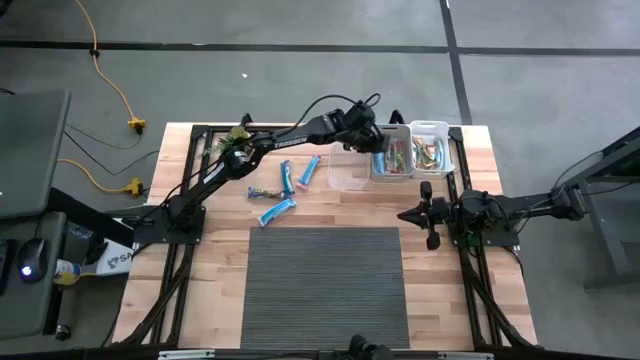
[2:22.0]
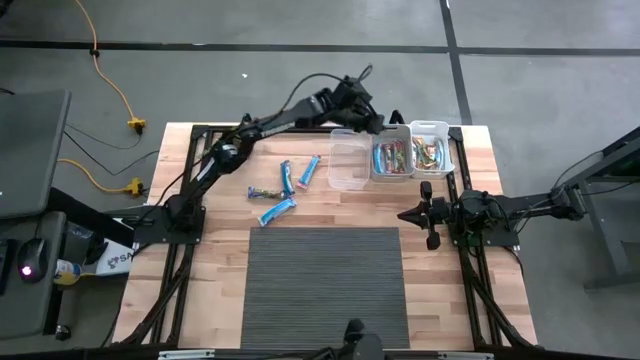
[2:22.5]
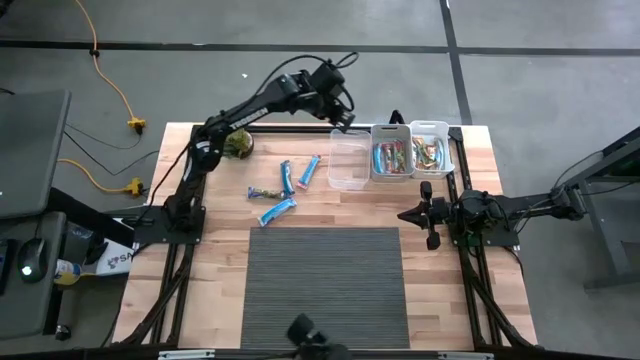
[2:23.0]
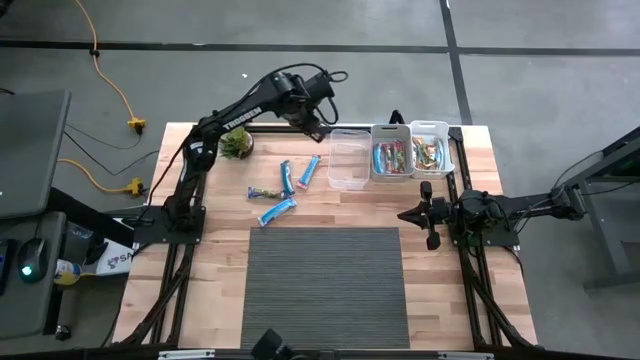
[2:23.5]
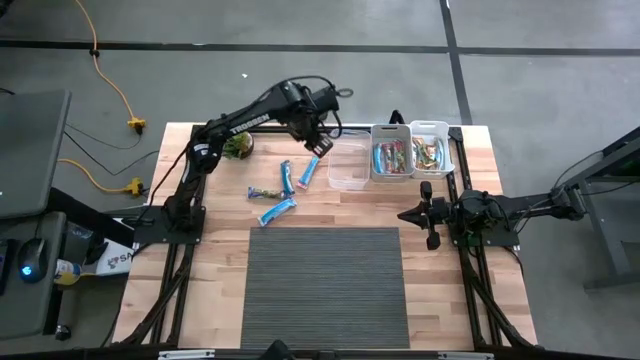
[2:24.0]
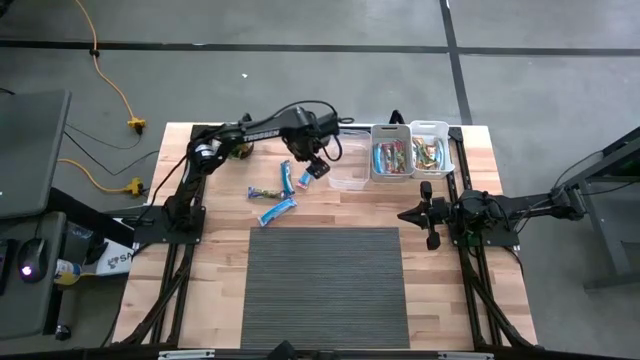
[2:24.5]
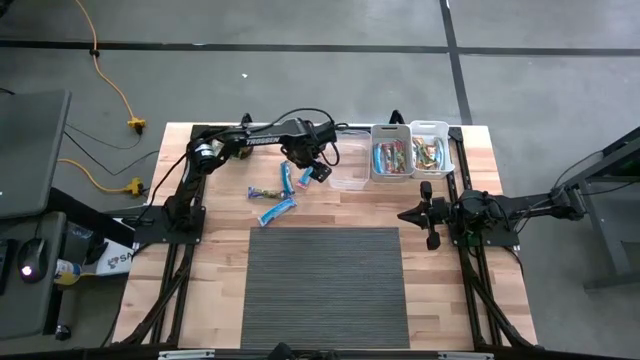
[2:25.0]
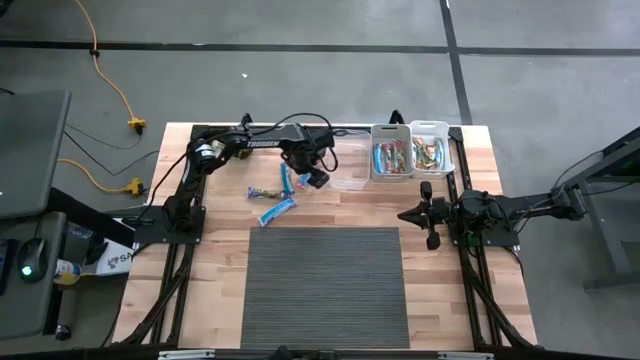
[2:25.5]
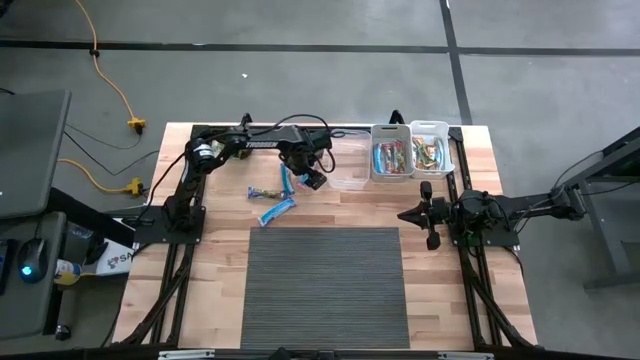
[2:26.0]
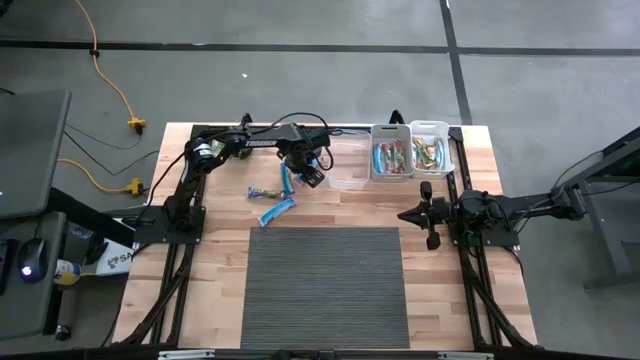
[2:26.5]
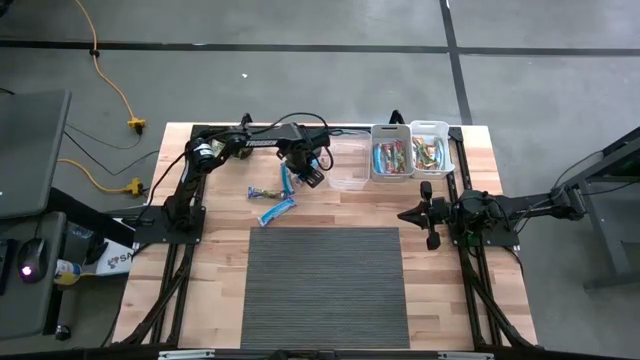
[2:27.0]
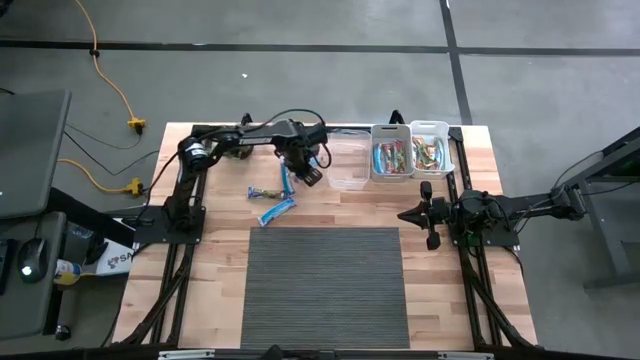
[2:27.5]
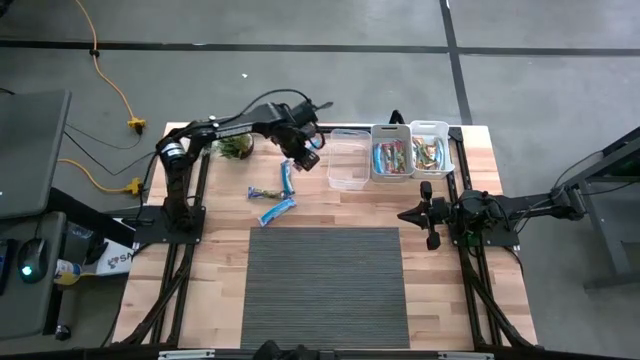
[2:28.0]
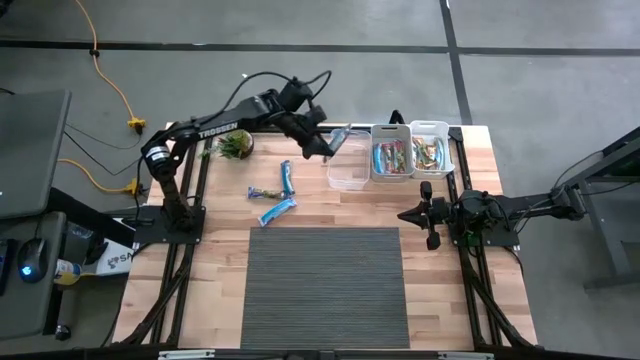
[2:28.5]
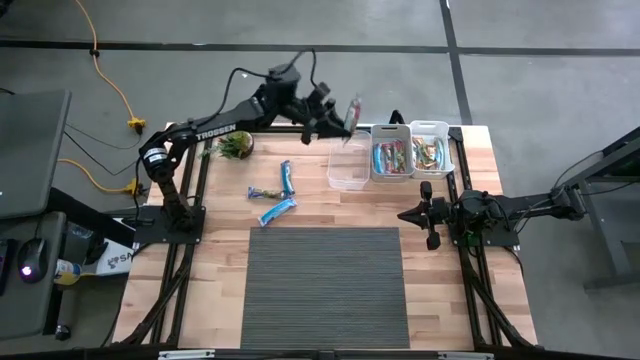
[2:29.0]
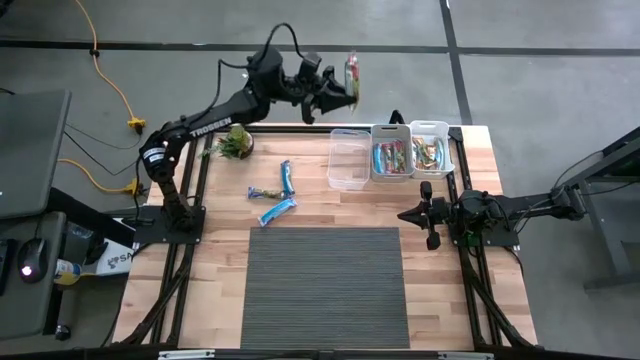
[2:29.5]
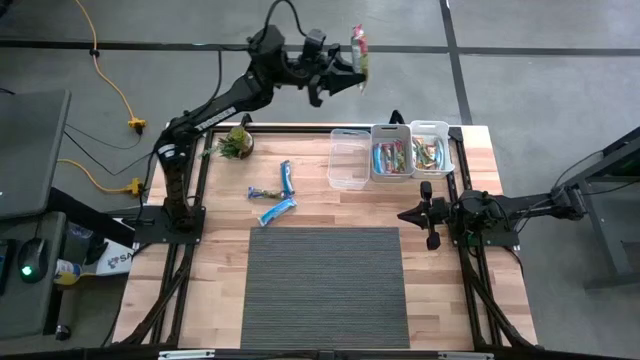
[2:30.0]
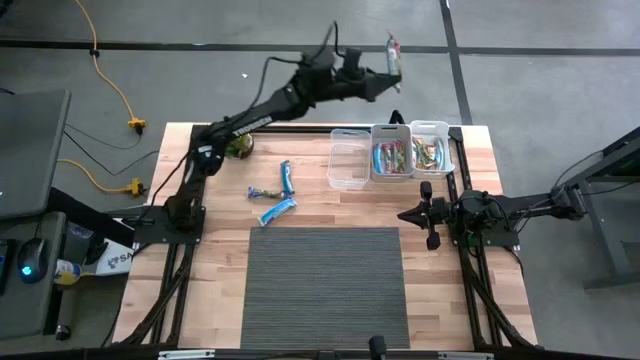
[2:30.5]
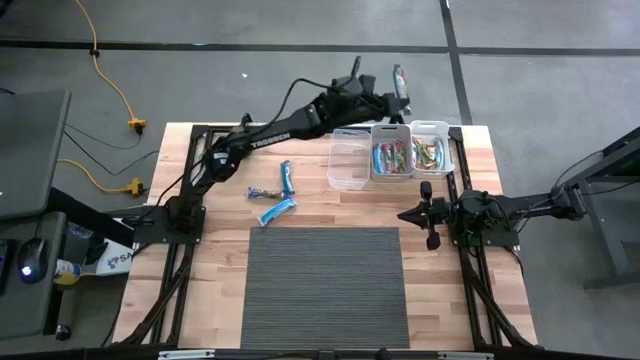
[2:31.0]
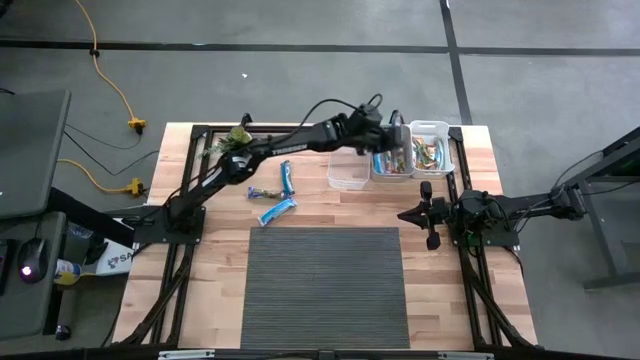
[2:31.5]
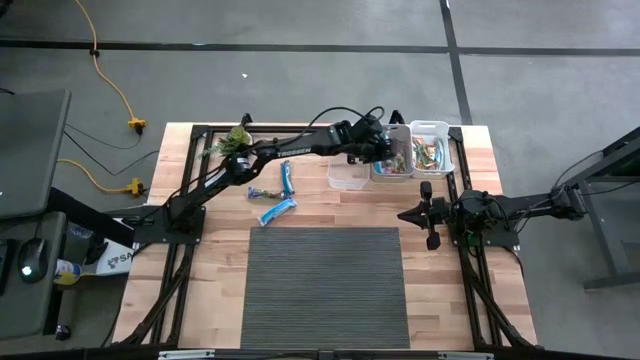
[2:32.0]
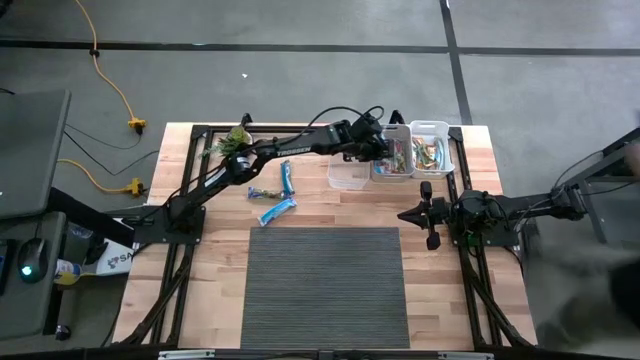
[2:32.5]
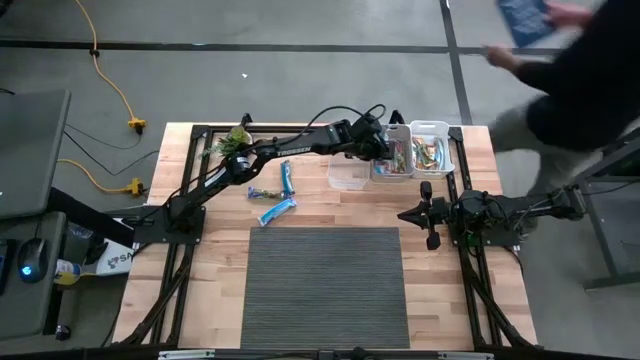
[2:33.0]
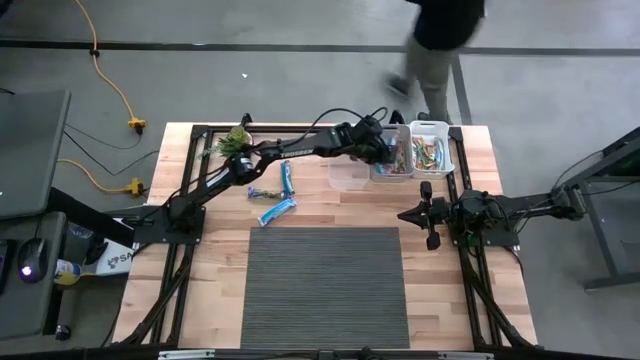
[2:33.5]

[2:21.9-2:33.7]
Task: Pick and place Granola Bars by type
Put the red granola bar into the gray bin

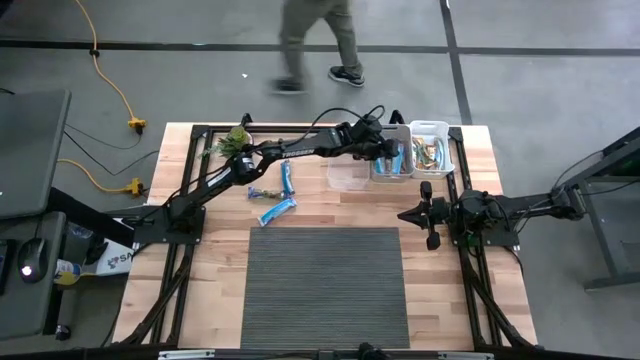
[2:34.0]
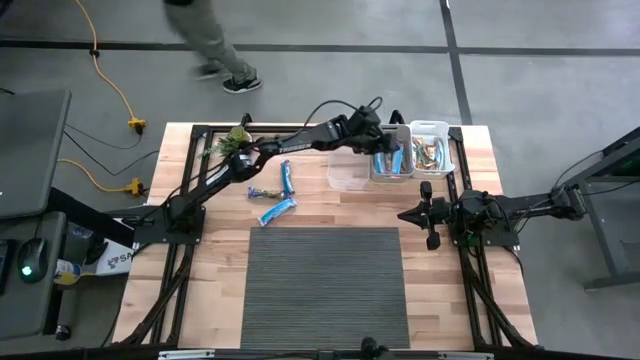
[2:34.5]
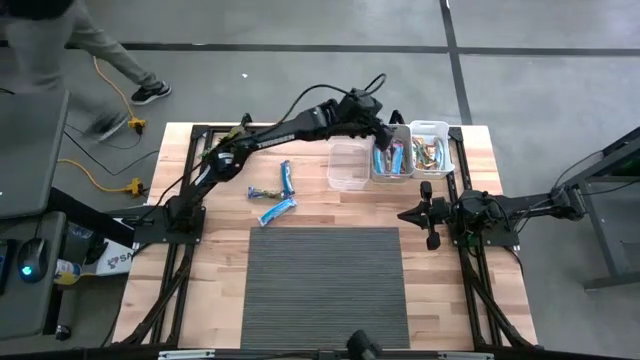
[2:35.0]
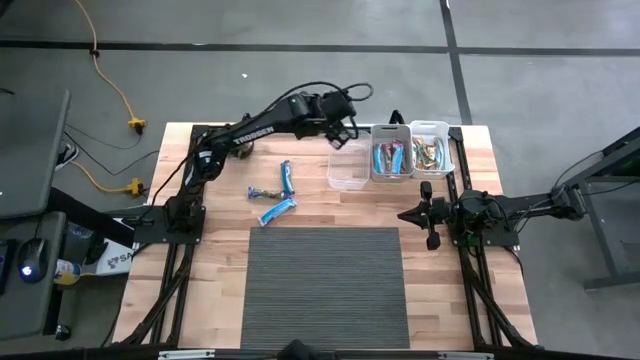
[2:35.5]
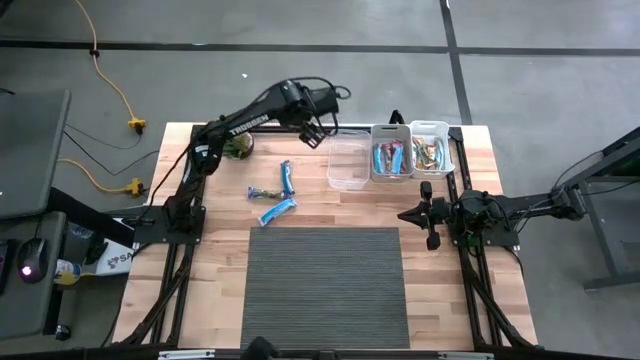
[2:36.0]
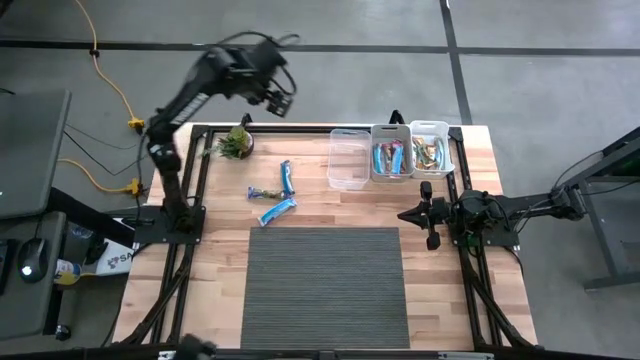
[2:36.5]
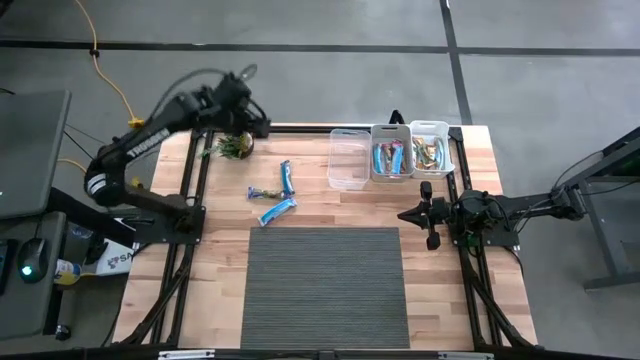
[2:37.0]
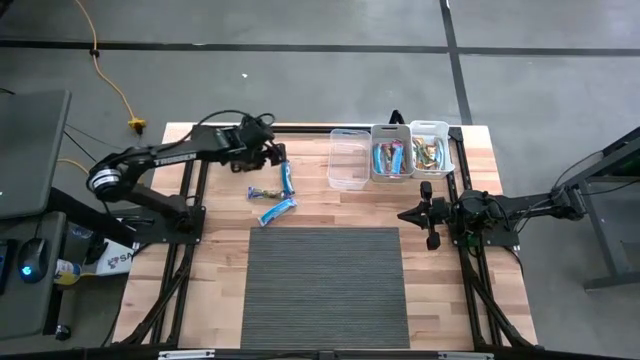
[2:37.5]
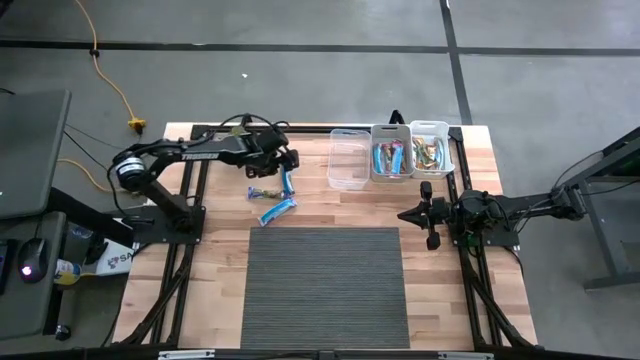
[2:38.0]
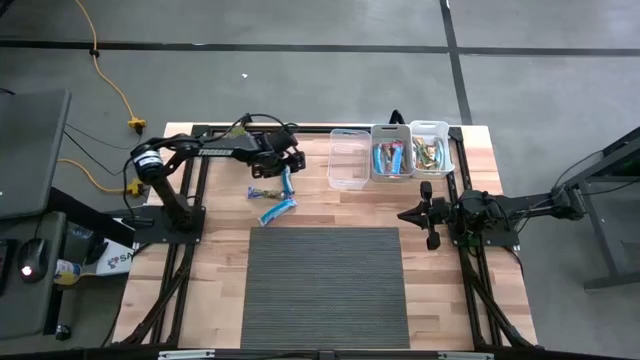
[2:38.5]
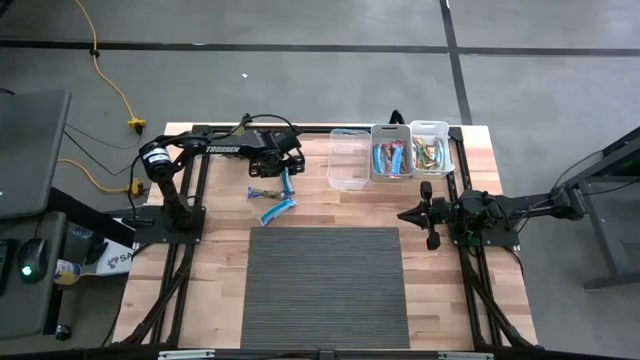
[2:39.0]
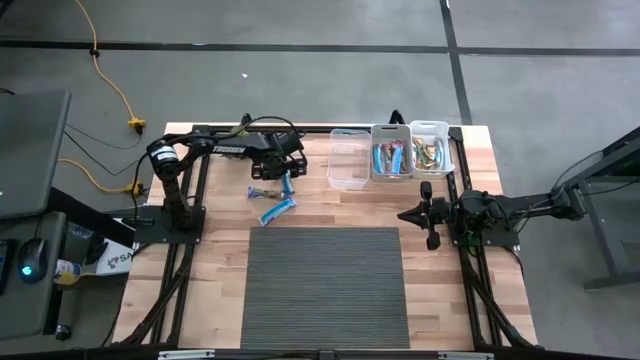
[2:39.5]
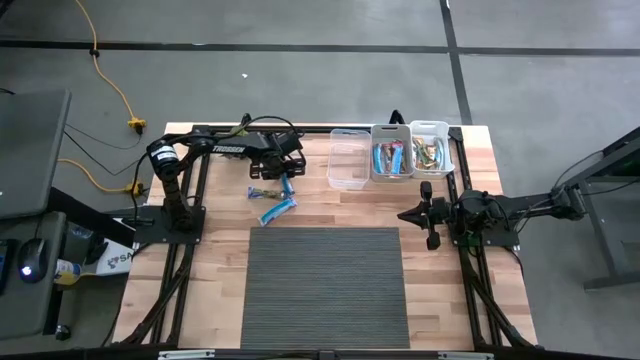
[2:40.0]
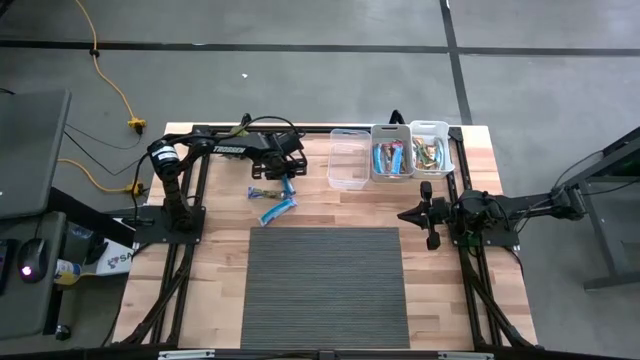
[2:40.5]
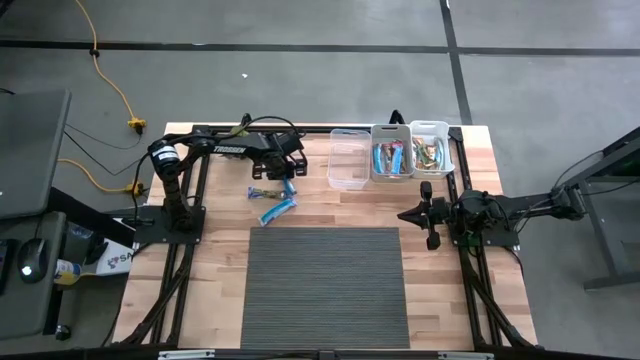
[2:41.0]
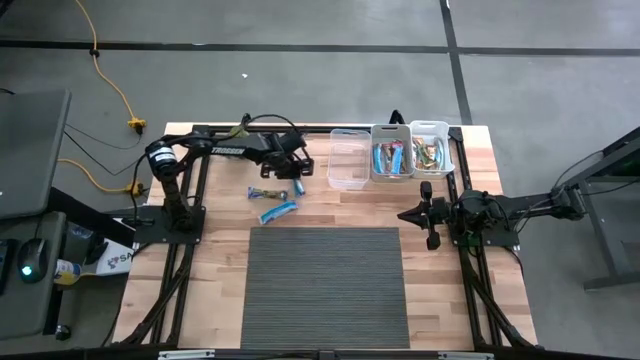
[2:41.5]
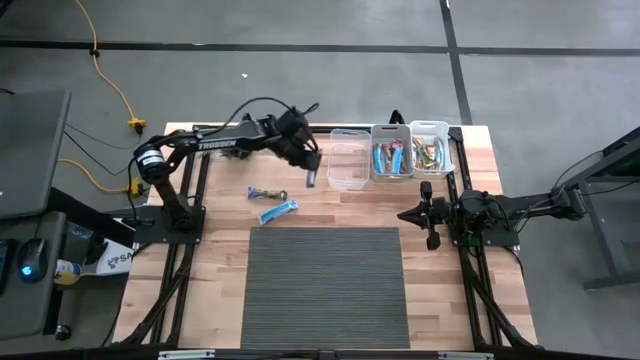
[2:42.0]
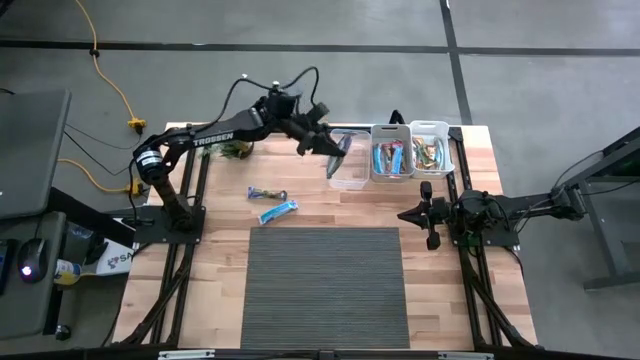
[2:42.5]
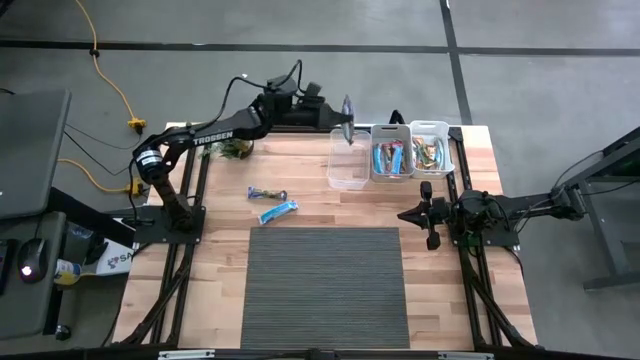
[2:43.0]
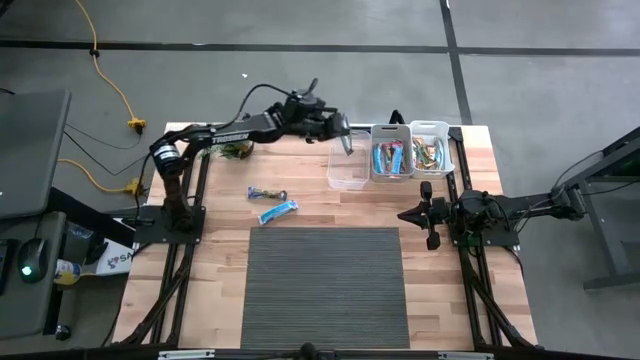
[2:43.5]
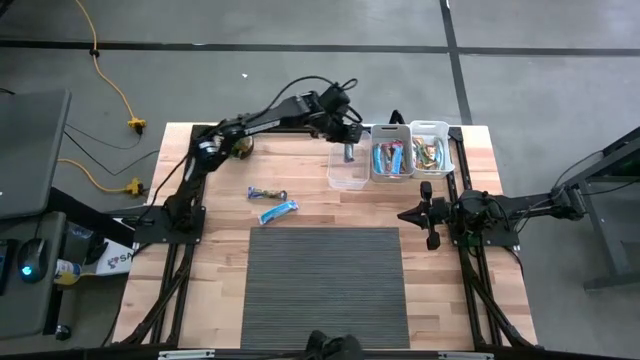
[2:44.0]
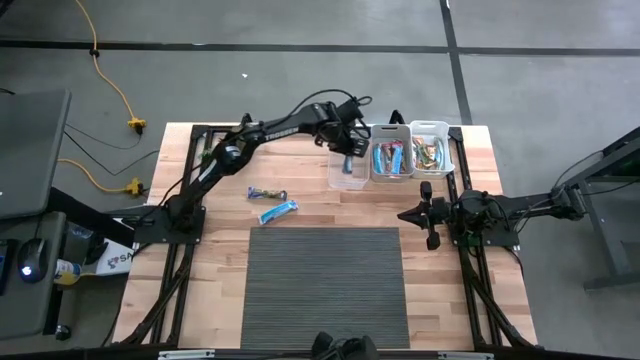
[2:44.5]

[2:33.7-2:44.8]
Put the blue granola bar into the transparent bin
